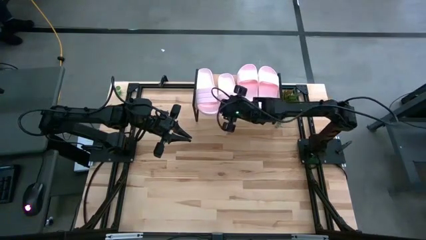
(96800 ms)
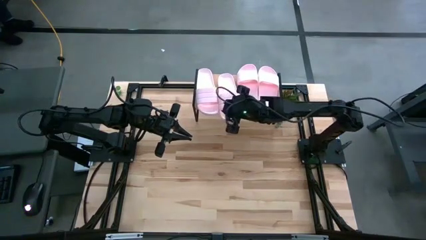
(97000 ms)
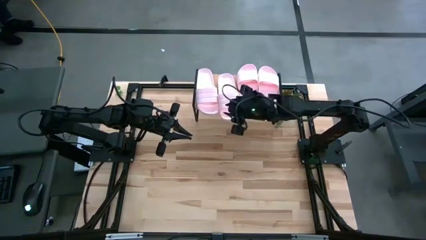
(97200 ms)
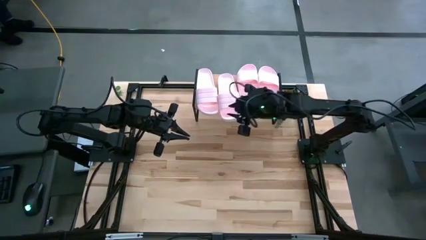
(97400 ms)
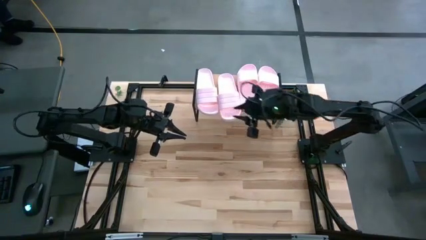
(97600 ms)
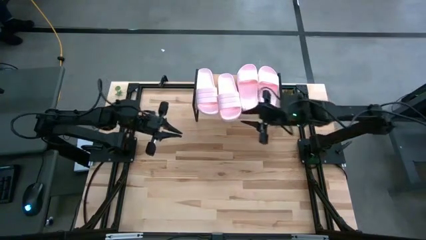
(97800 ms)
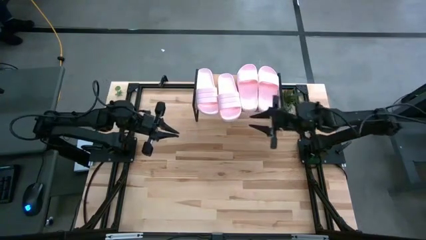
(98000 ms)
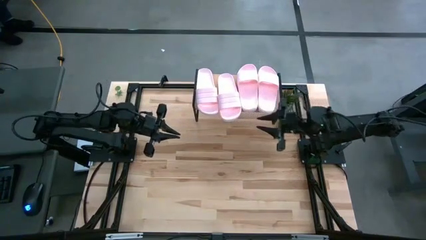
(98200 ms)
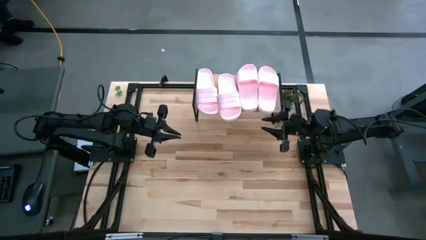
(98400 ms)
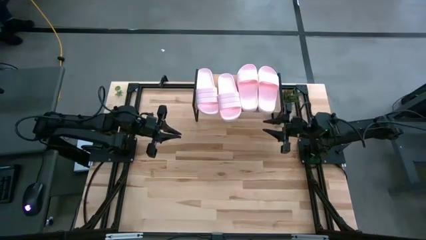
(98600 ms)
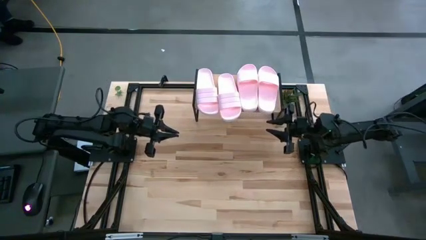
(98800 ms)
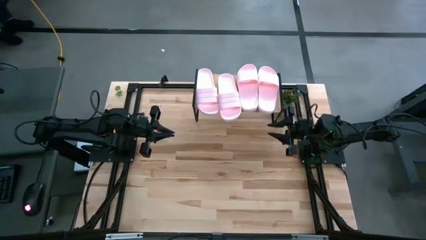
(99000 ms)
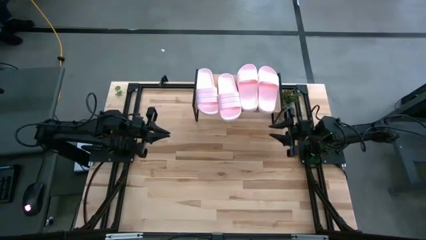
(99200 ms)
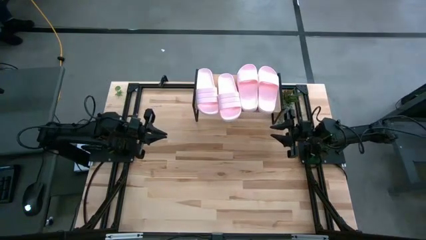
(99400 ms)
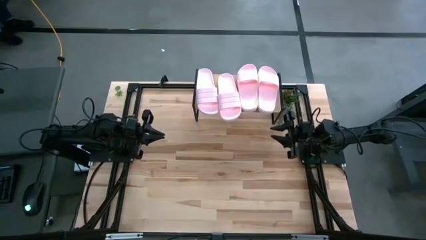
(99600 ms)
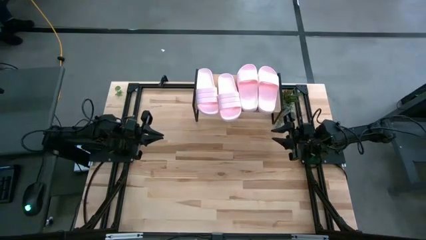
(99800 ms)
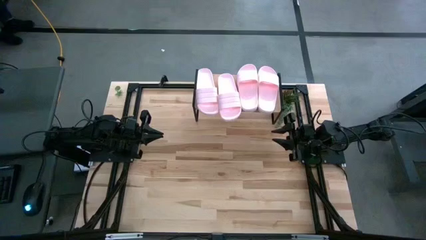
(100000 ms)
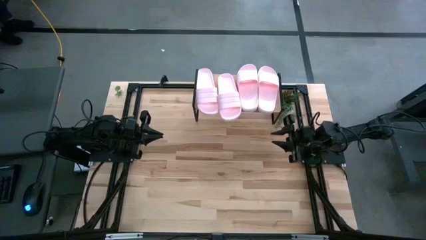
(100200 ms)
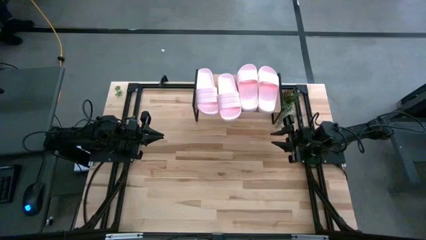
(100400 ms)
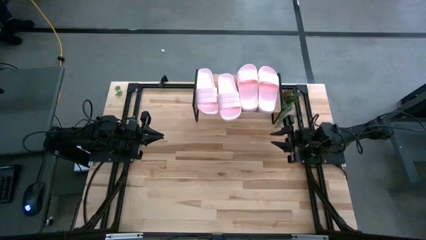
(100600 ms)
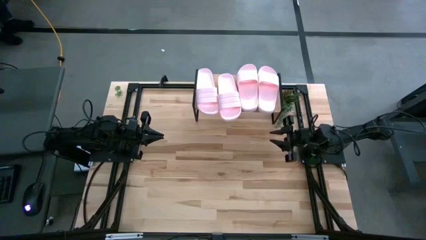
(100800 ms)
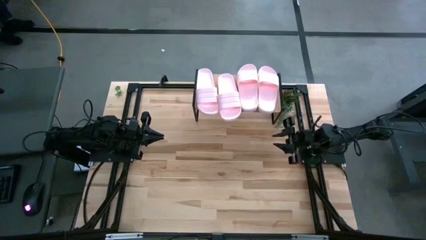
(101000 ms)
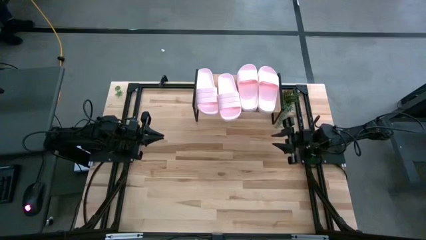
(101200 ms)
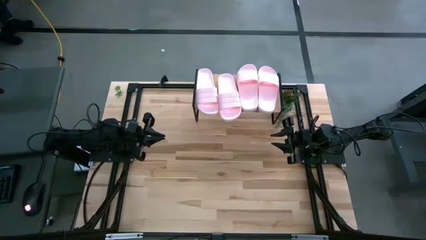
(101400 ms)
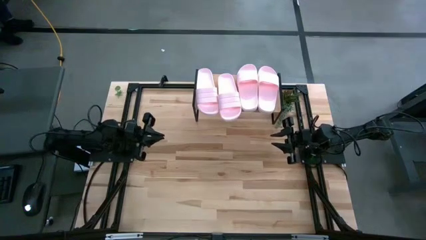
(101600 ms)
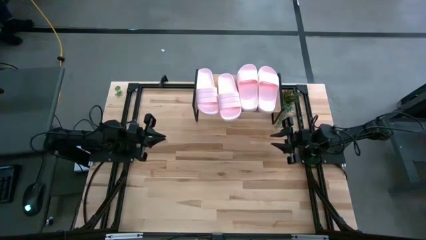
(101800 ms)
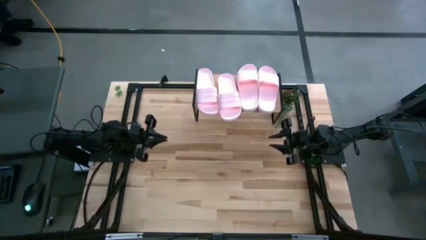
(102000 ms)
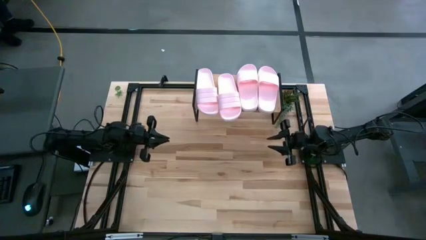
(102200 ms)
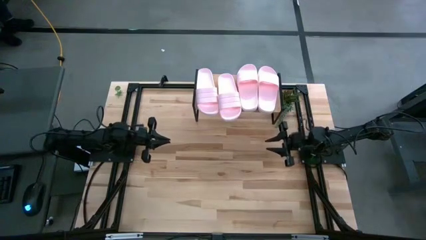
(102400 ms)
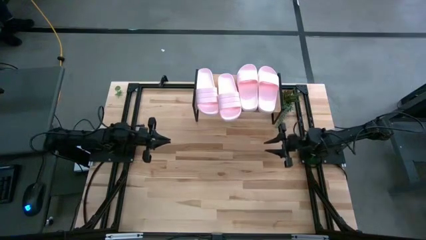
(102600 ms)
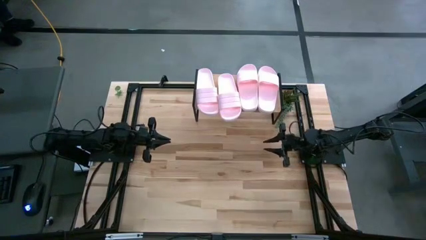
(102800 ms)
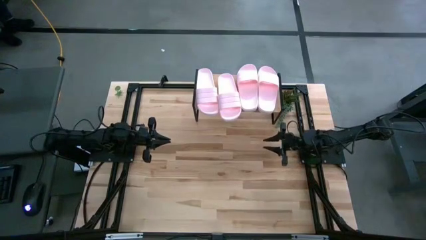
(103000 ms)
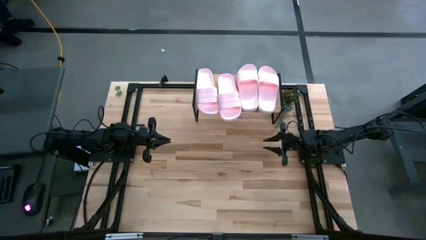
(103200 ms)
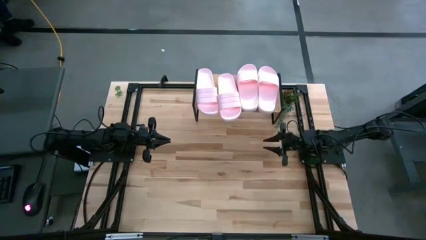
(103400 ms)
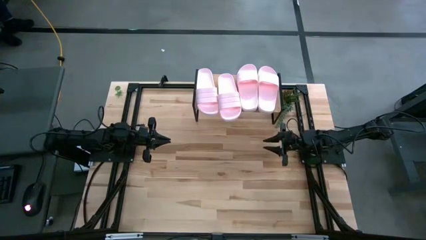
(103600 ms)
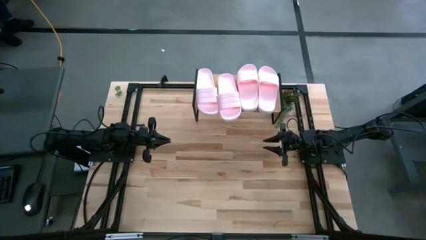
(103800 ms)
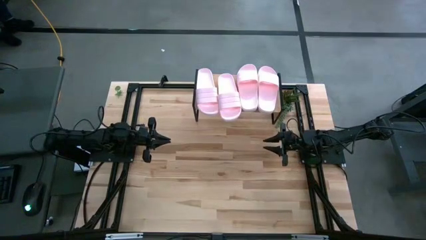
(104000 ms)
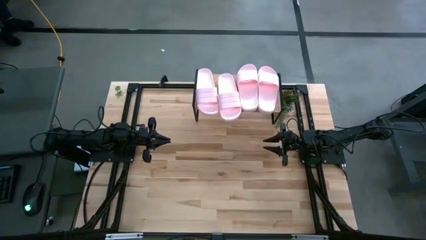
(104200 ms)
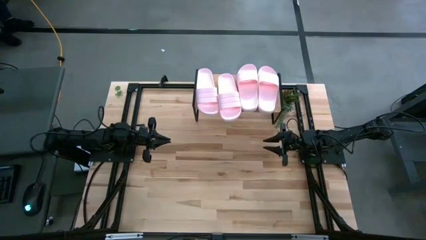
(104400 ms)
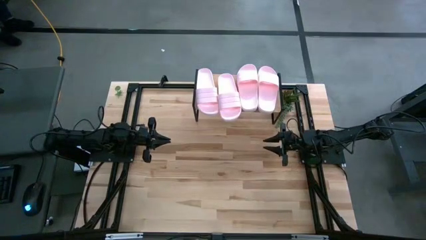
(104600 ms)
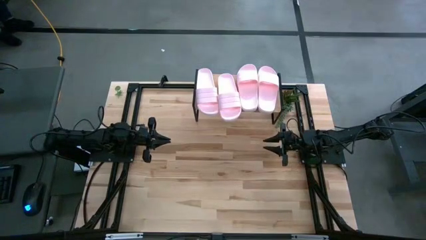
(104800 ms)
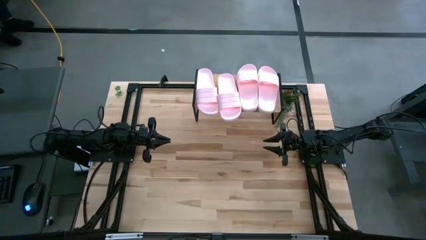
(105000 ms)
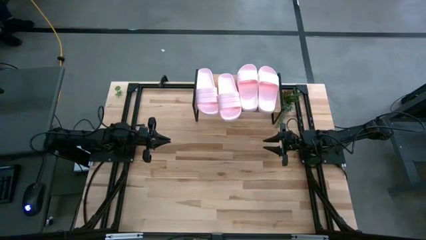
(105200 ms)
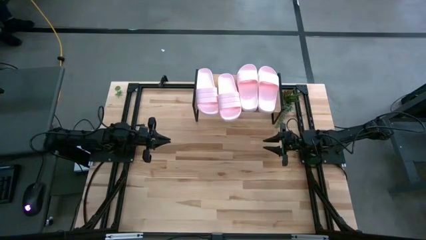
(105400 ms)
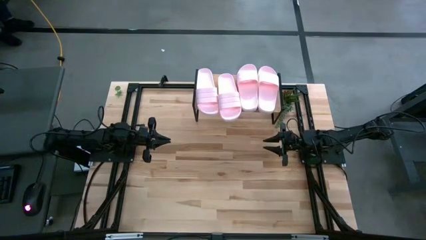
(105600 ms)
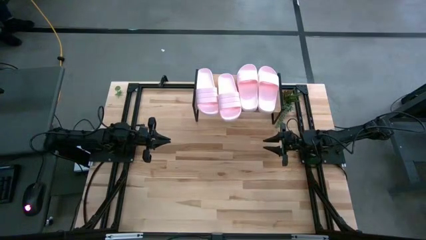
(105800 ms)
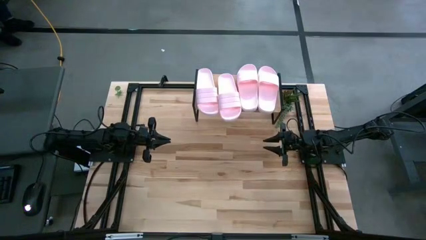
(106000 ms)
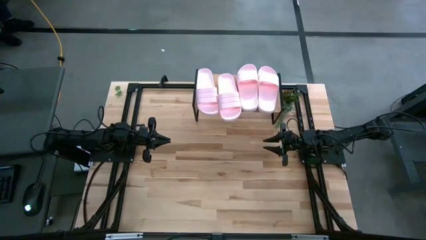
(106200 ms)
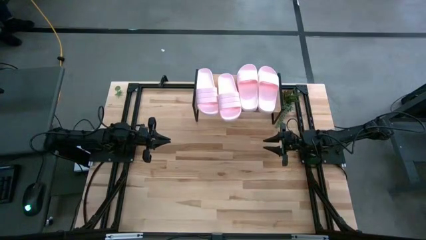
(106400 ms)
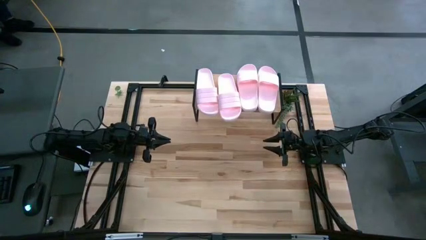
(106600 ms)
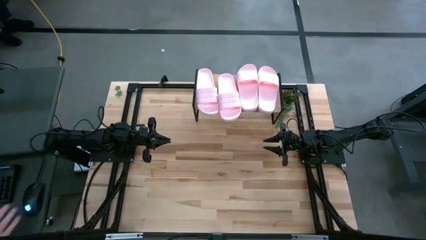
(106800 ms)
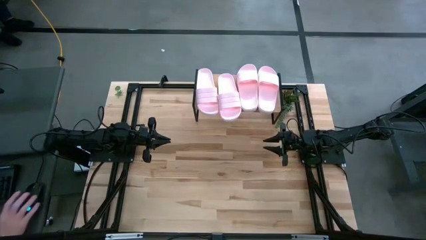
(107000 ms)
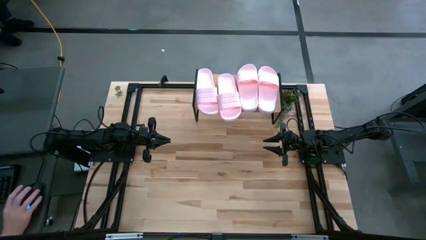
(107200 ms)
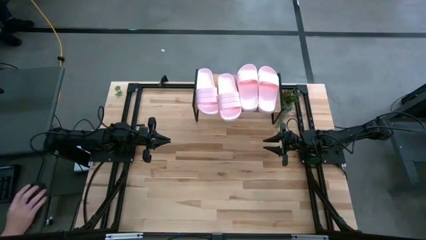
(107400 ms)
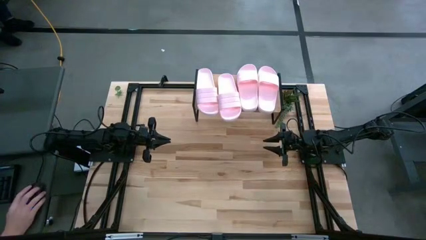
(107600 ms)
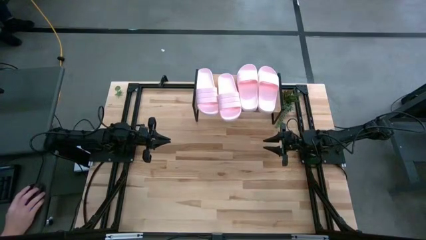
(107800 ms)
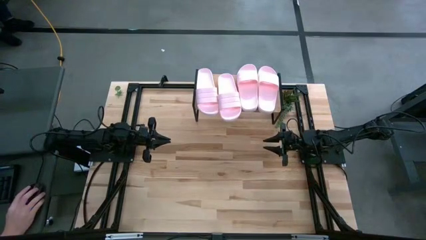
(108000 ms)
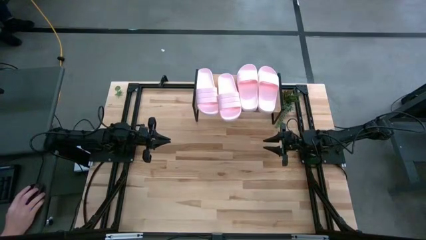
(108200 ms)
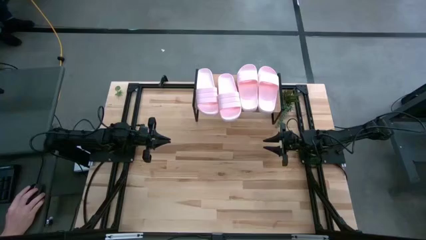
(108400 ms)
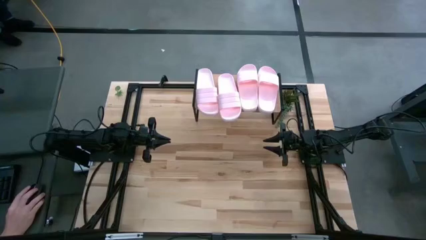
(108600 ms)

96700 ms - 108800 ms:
Task: Pick and place slides into the shelf
Return to Home Position
